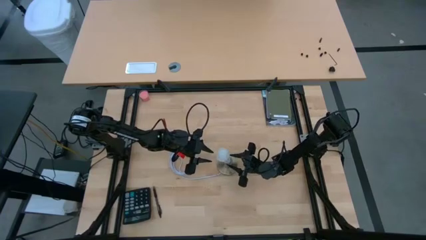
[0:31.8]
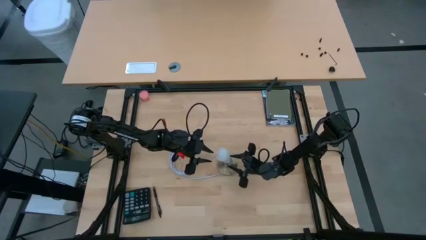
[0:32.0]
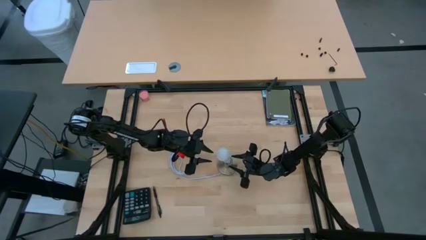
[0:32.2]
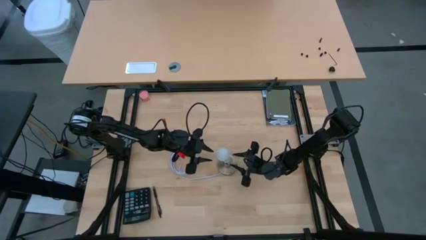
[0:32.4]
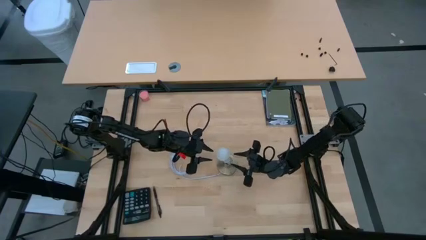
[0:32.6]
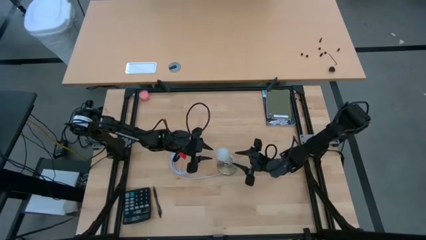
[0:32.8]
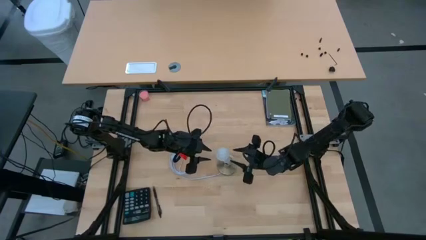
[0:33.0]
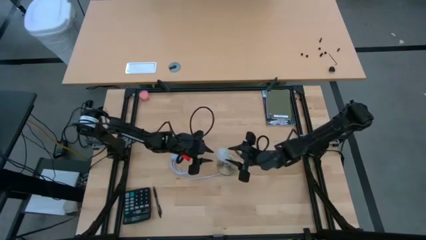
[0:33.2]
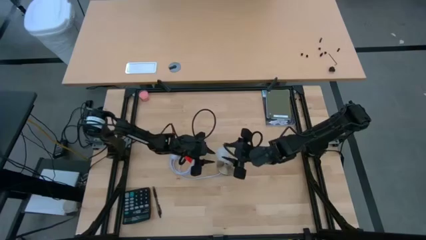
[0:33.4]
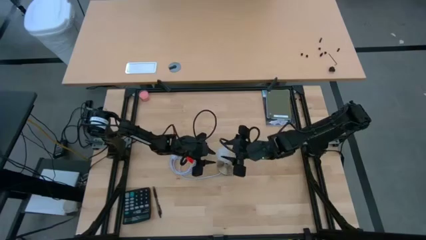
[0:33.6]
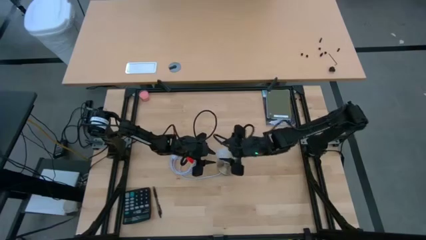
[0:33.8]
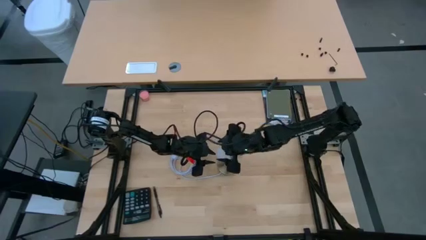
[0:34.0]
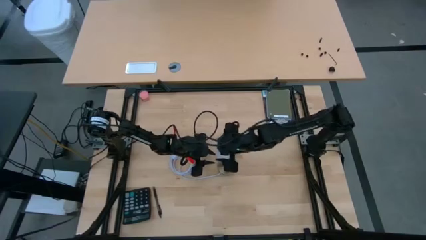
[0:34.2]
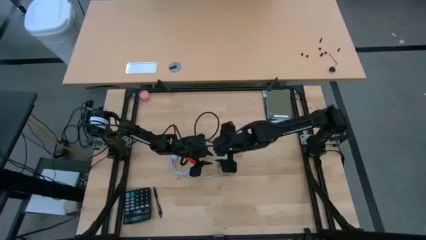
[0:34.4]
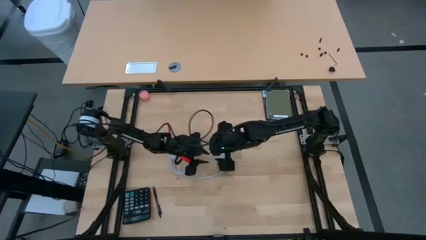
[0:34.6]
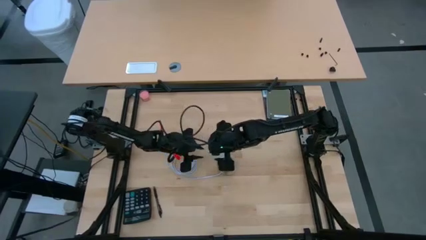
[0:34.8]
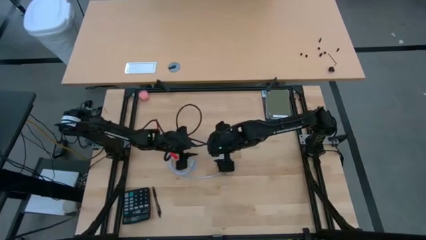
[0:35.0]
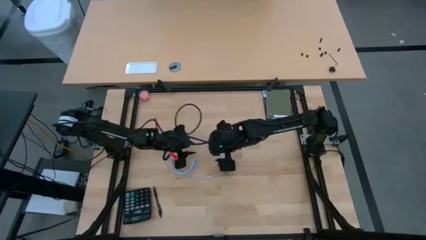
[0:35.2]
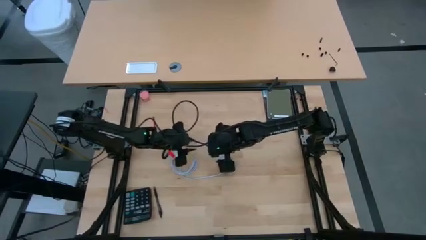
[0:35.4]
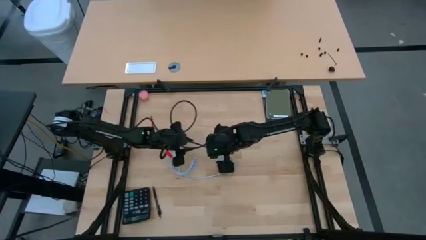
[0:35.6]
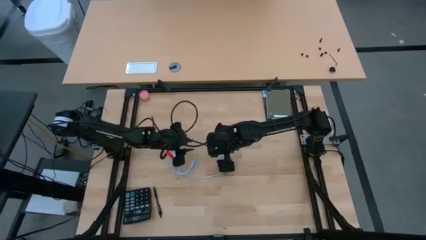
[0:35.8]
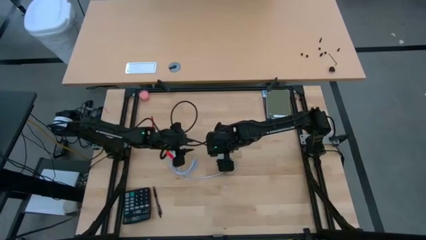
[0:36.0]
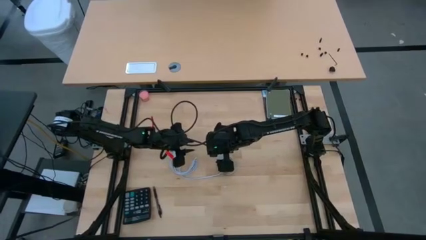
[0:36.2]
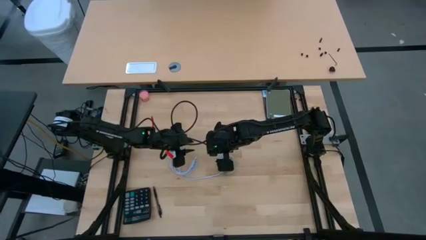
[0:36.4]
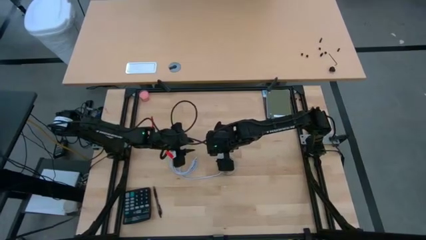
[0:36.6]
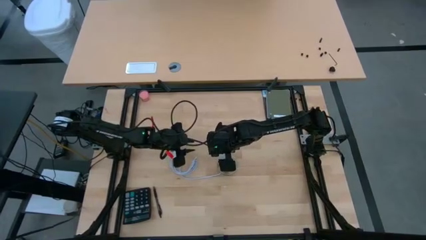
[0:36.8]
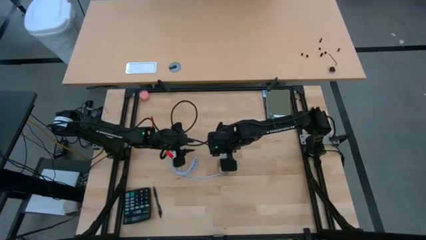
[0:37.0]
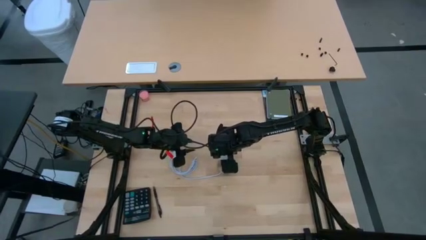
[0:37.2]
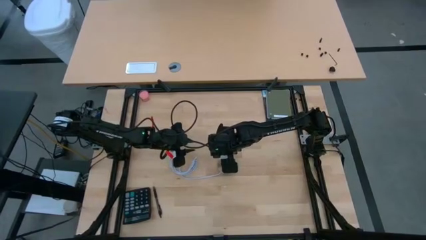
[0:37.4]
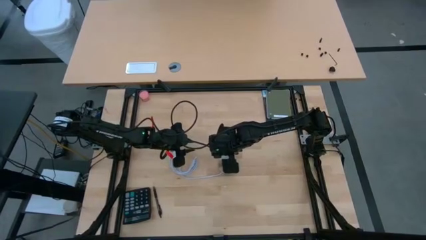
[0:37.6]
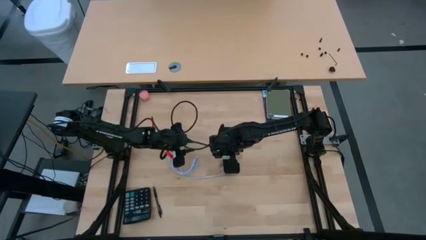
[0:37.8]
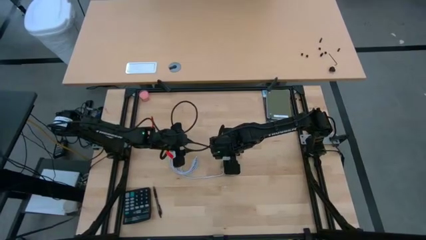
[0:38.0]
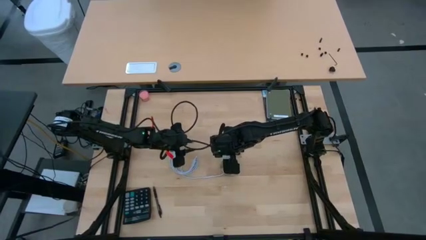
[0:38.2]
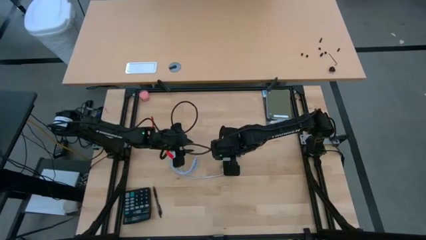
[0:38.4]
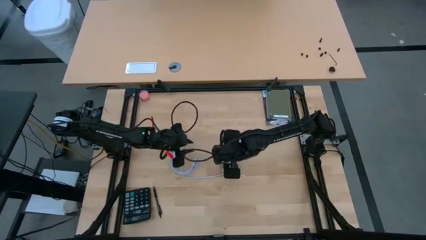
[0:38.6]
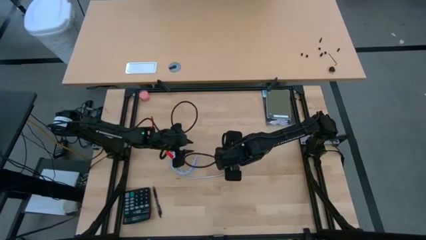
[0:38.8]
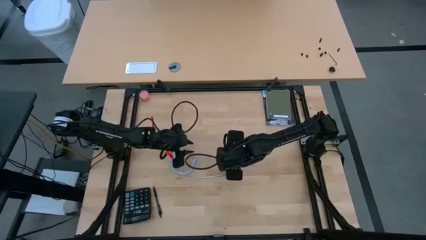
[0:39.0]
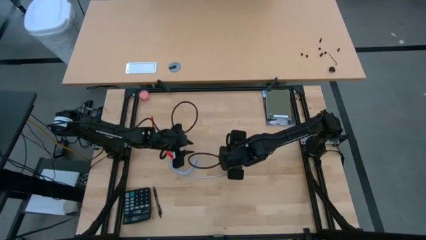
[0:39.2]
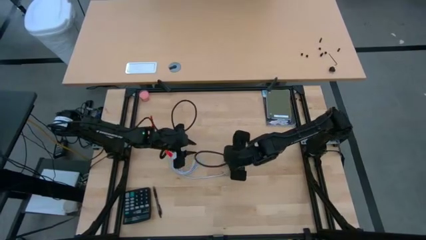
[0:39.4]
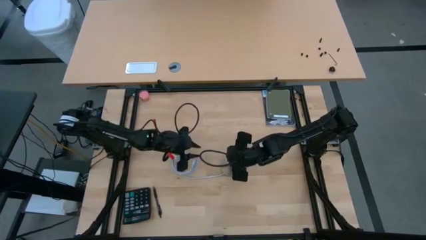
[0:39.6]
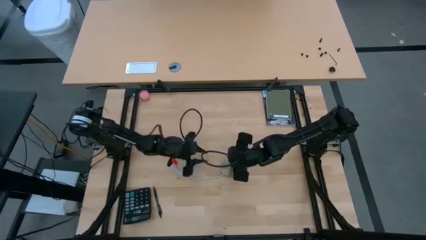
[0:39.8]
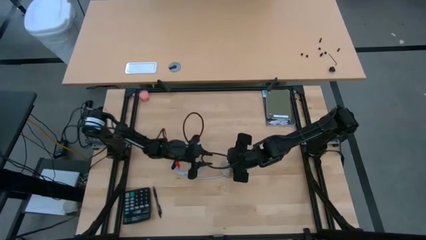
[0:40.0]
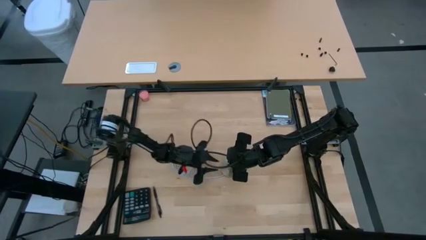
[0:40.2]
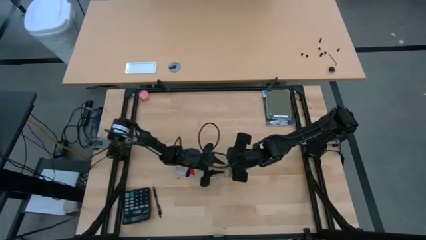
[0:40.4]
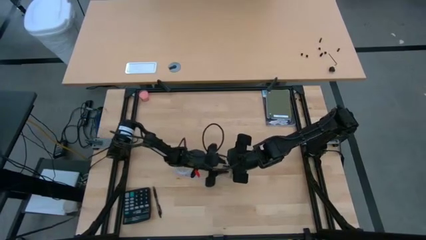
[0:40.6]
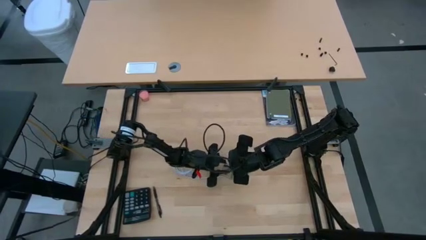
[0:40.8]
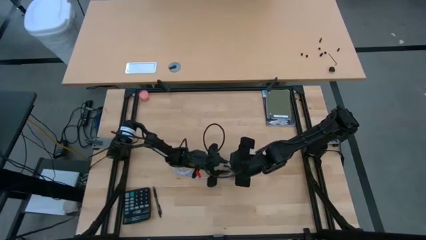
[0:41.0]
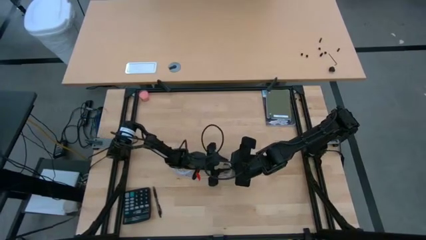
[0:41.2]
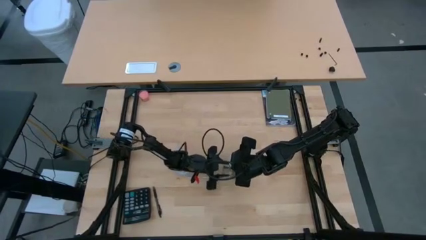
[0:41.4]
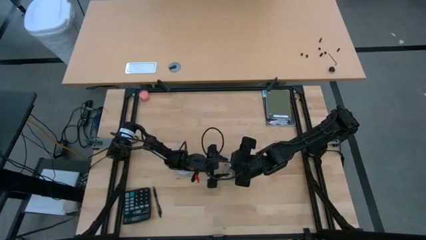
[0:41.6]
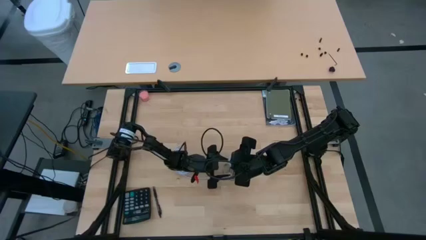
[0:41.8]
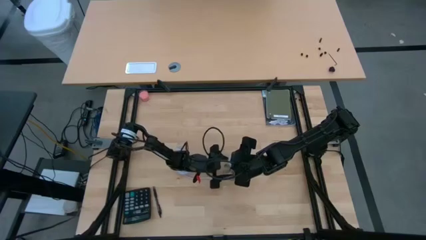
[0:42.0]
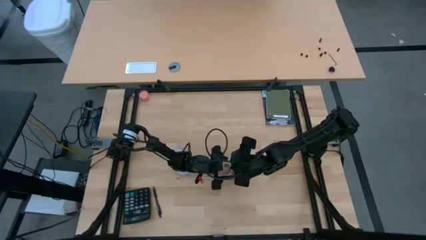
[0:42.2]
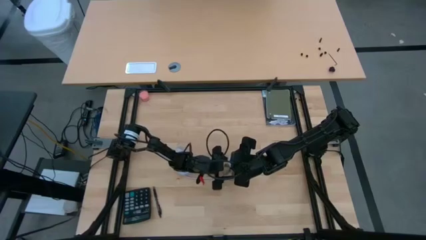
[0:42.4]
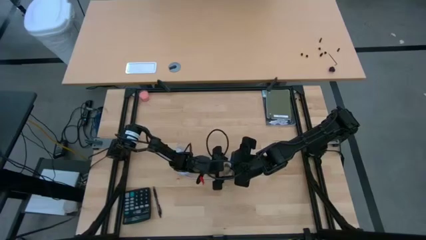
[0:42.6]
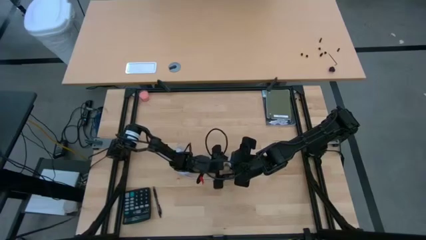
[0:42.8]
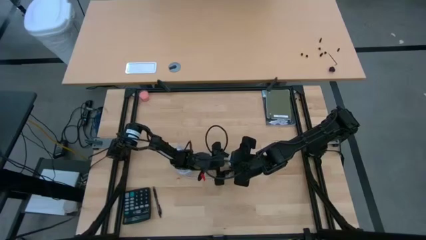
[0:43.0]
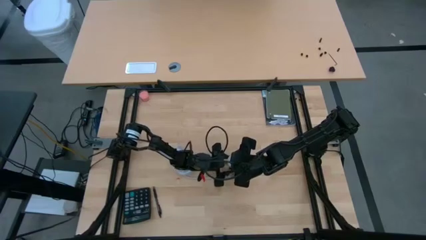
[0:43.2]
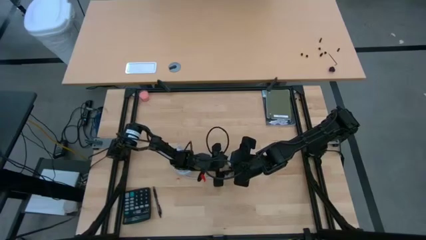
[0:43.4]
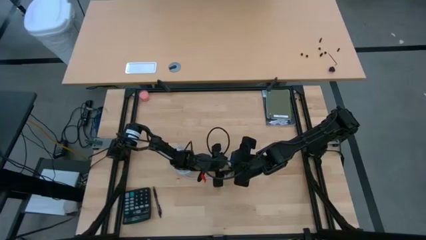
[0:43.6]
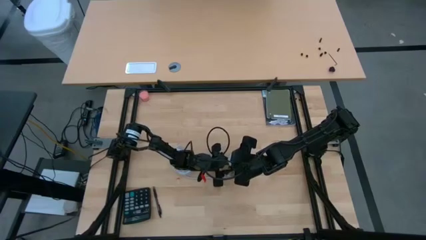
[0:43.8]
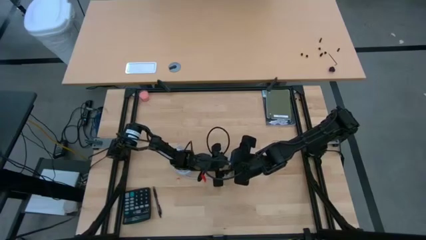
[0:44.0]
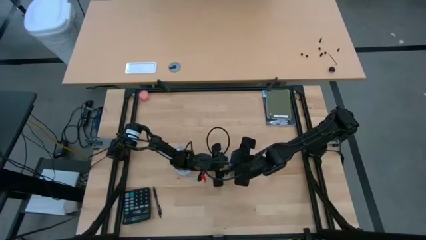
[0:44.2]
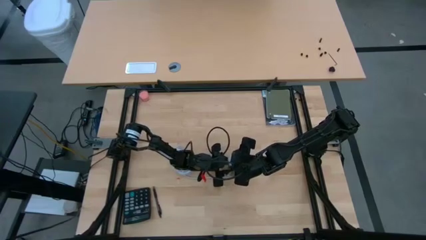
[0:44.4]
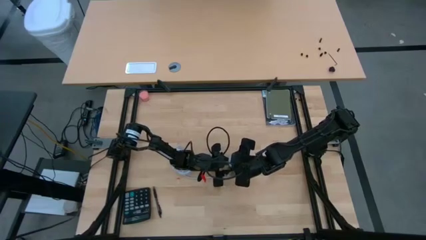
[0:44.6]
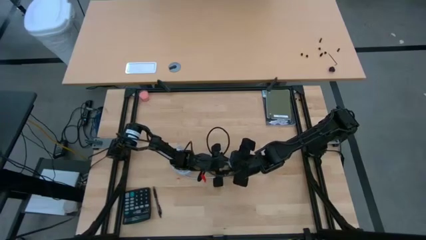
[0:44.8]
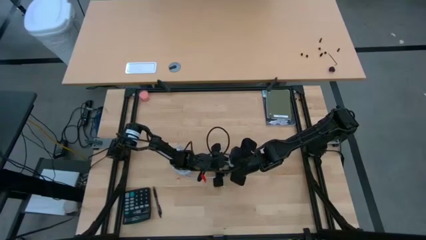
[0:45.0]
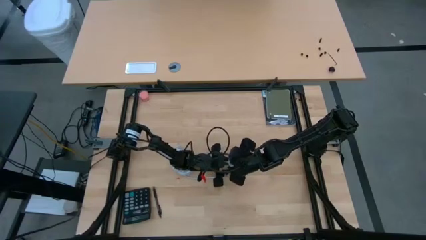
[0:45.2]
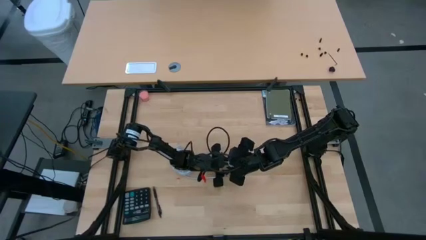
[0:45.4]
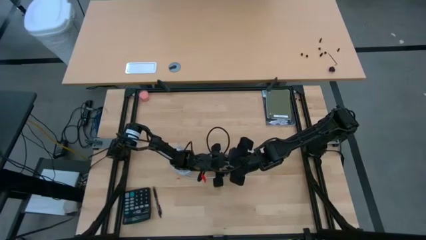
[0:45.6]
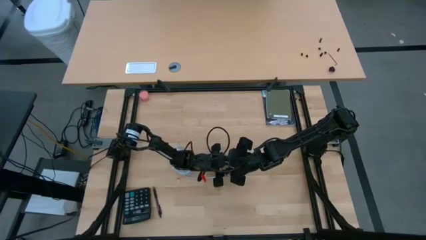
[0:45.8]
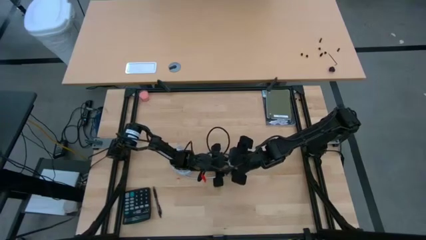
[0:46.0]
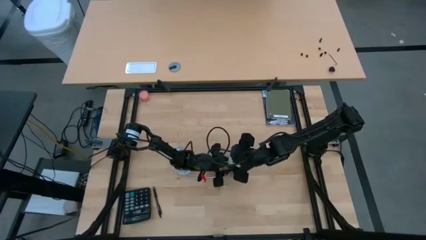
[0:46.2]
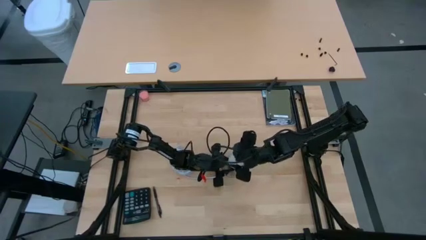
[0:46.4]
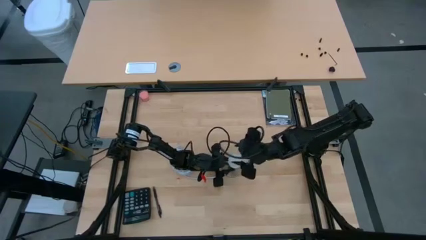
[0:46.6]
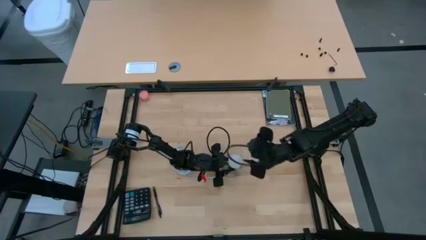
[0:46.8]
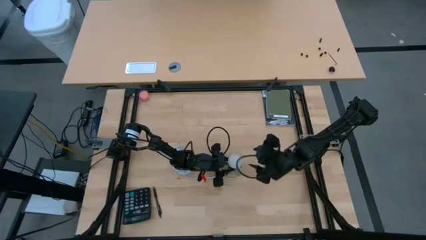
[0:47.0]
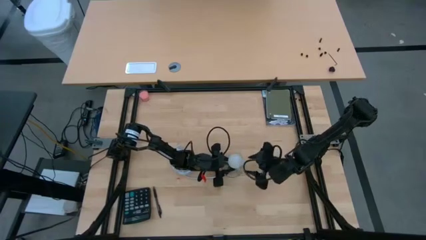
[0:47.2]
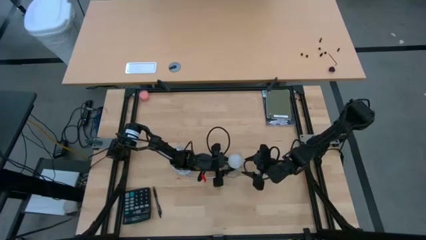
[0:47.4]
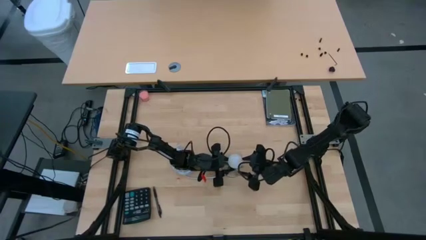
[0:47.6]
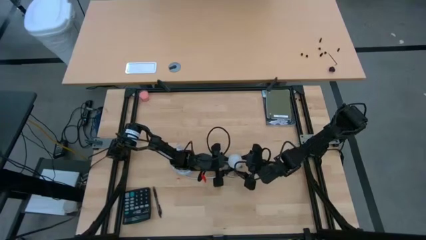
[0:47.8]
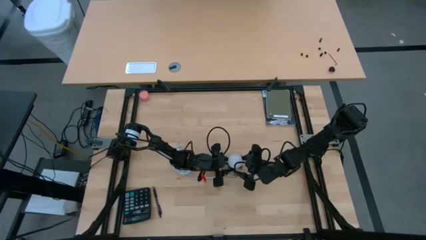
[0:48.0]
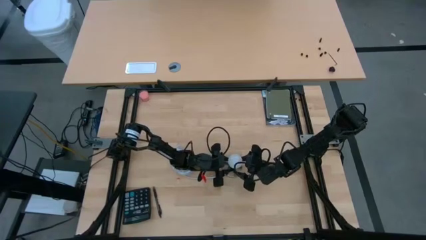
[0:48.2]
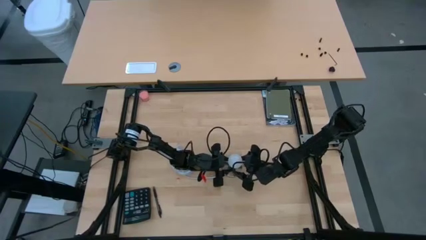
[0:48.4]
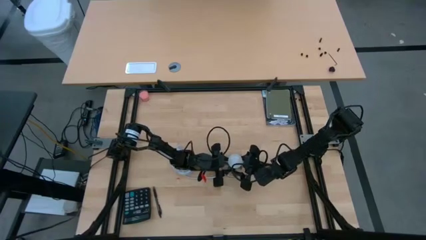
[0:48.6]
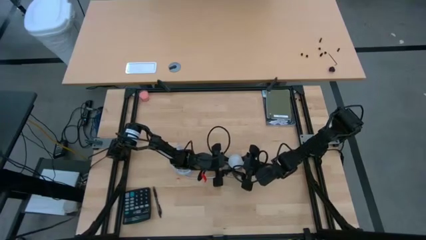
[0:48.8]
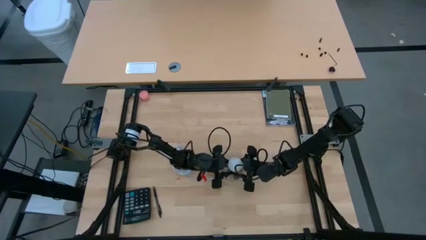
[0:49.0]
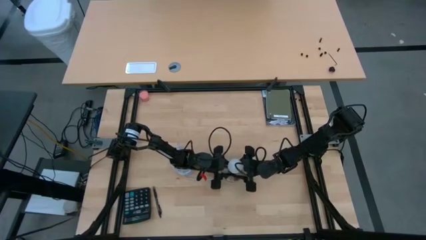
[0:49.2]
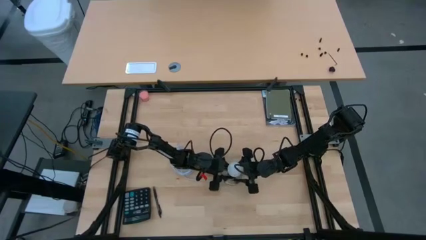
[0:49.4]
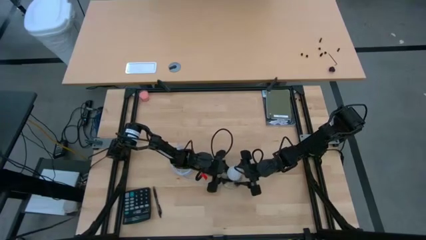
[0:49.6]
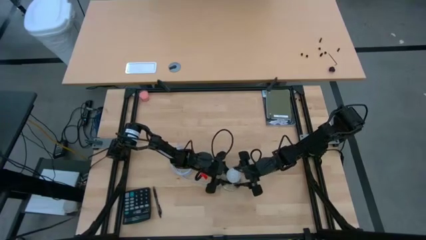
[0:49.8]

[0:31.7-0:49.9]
Task: Screw lightbulb
Insert the lightbulb into the lamp
